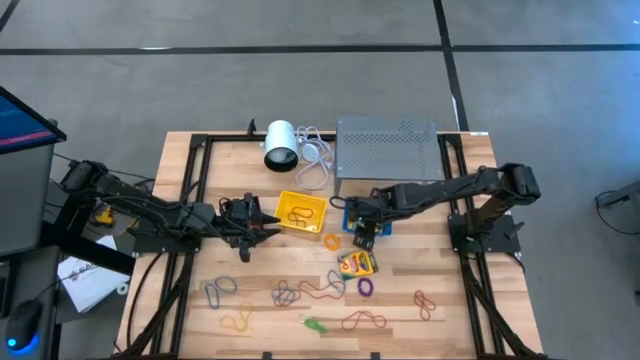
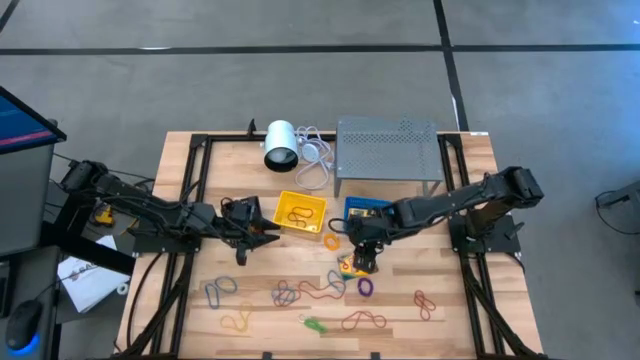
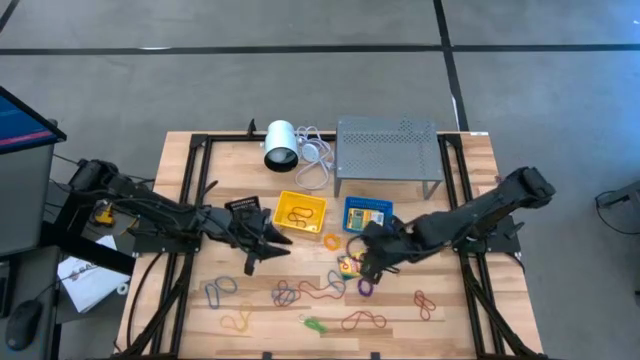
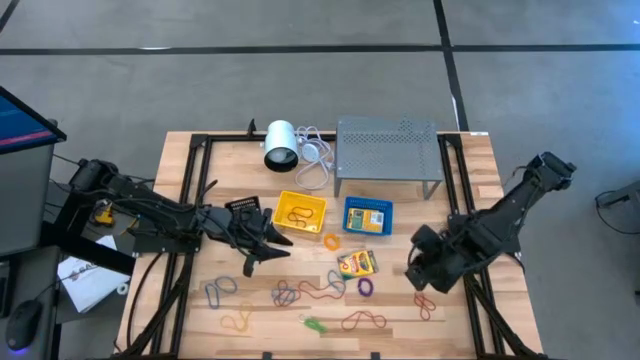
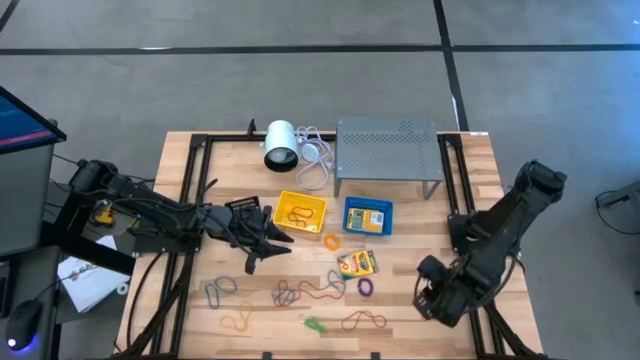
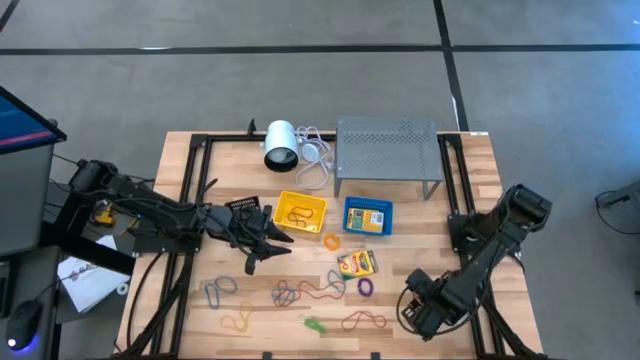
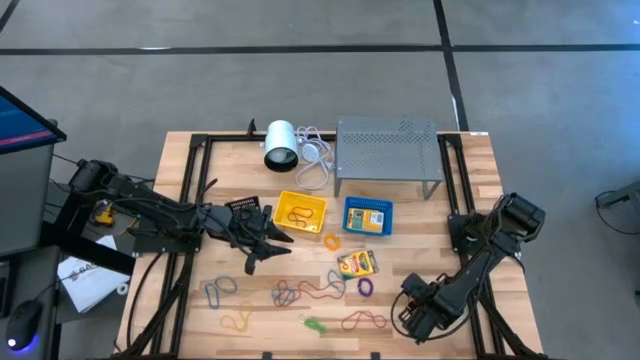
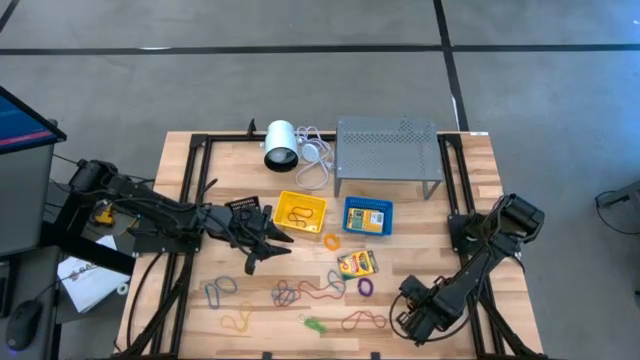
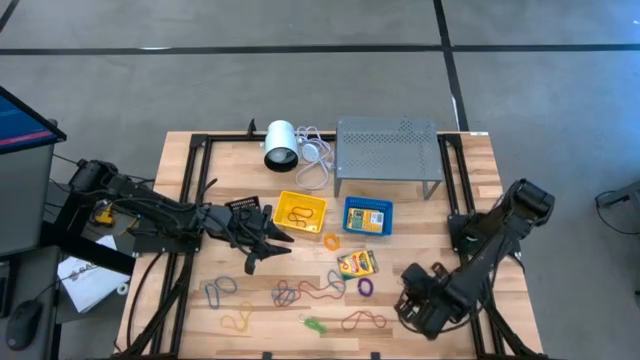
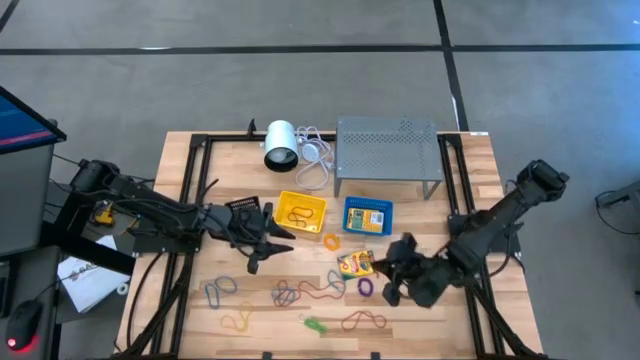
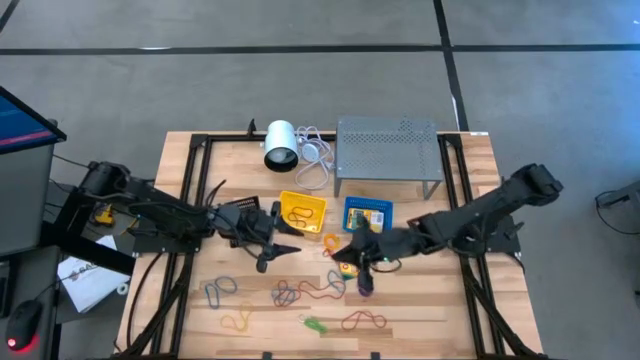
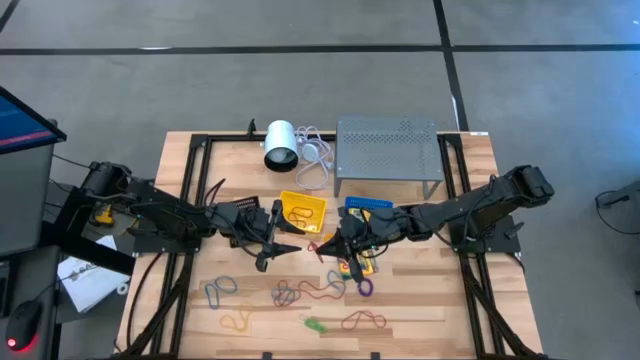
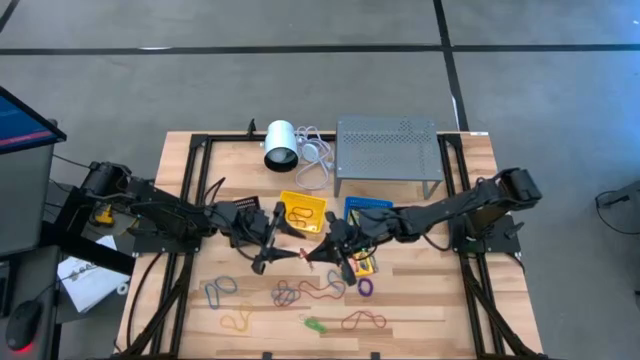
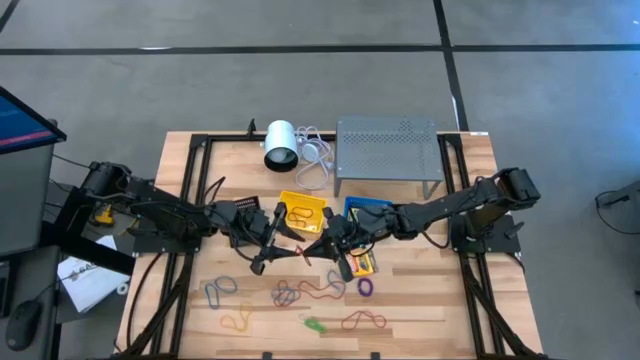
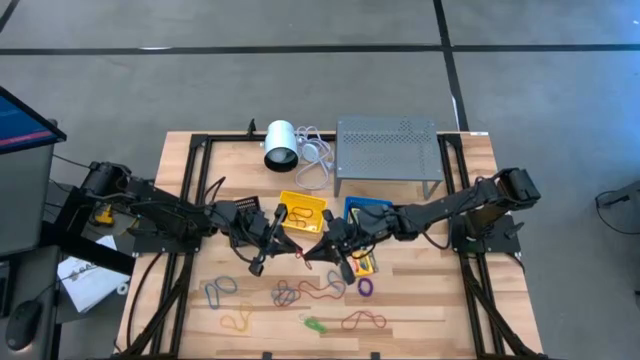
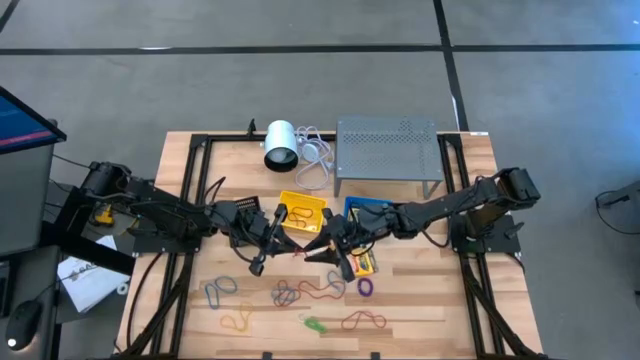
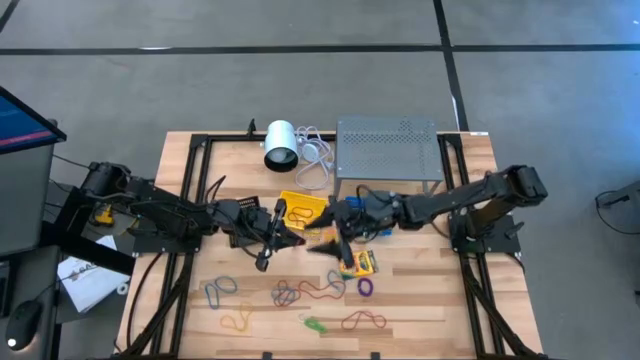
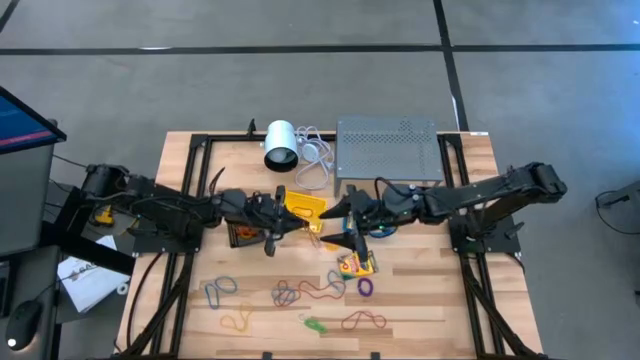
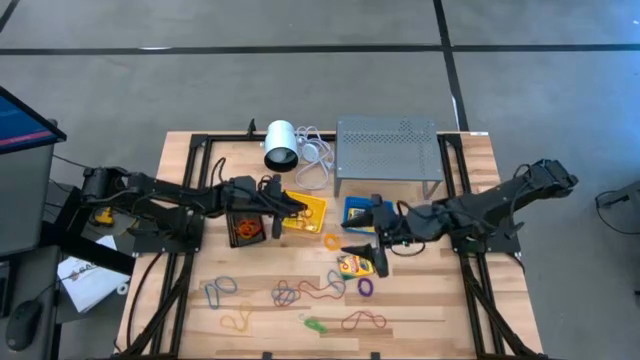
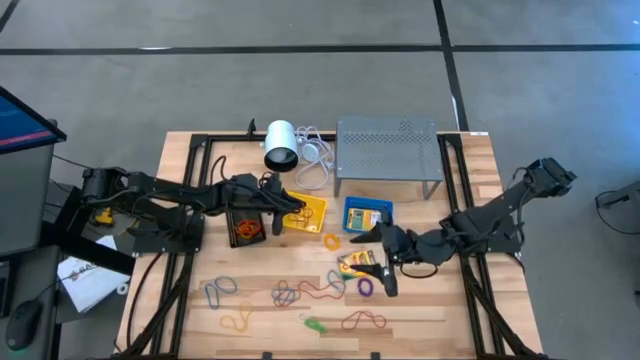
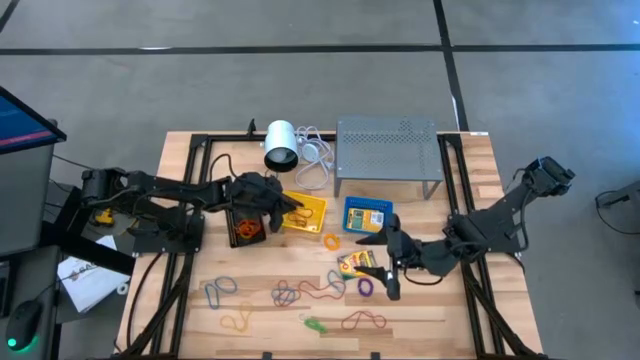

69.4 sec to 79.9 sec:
Task: Pick & Place Office Desk Supplies
Put the red rubber band into the yellow bin

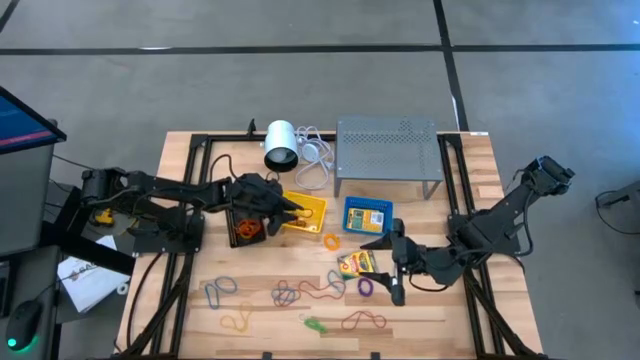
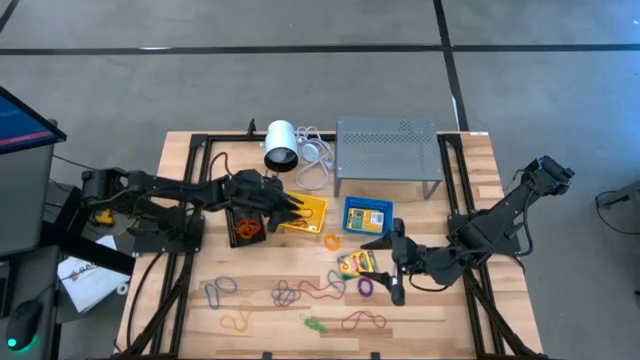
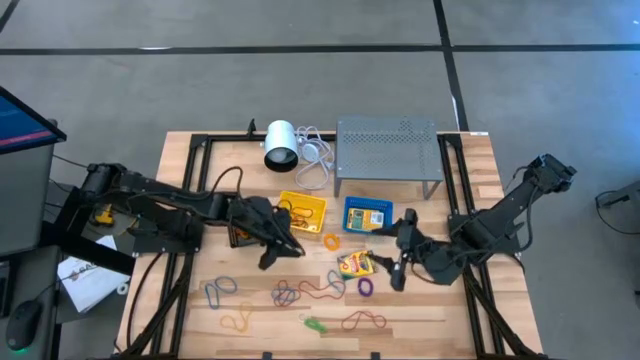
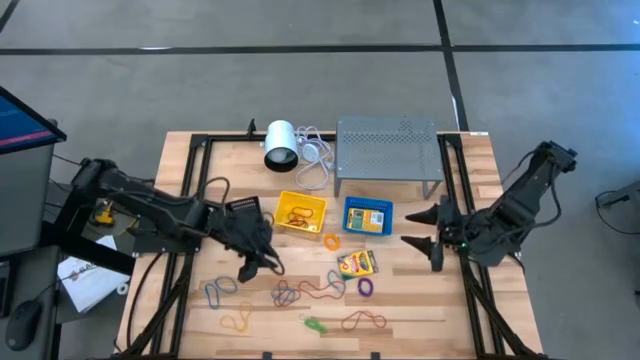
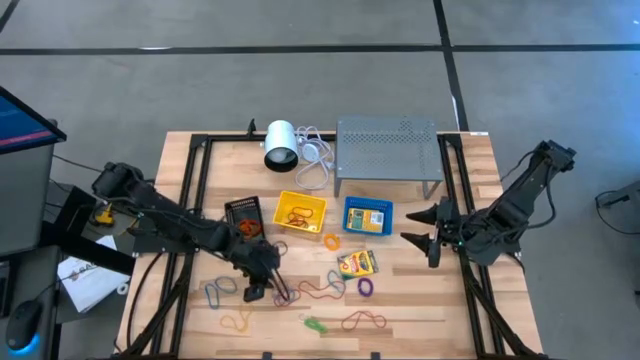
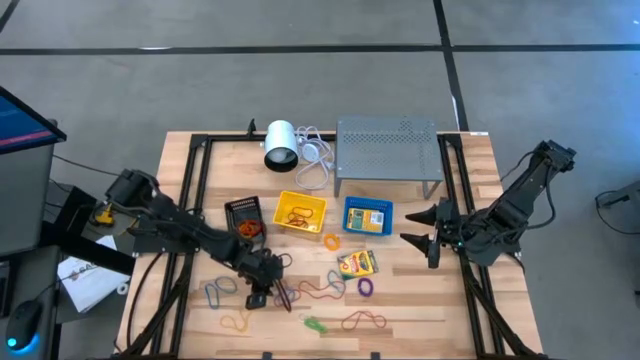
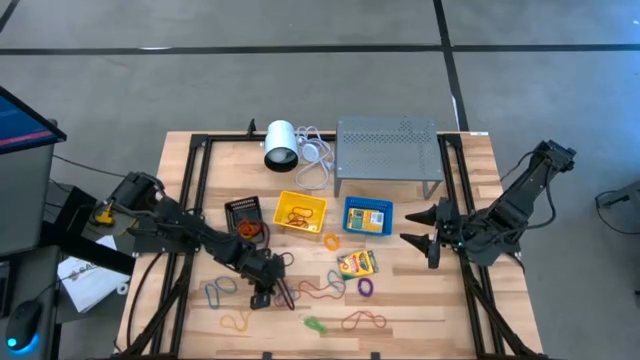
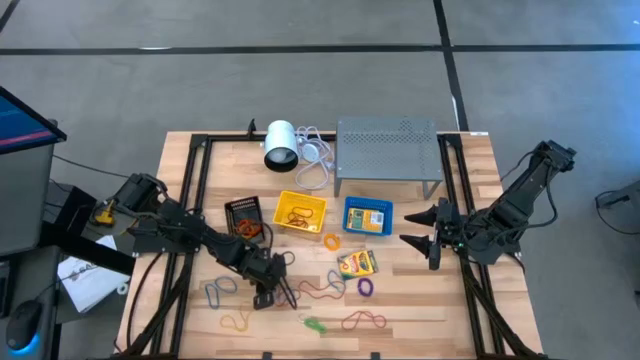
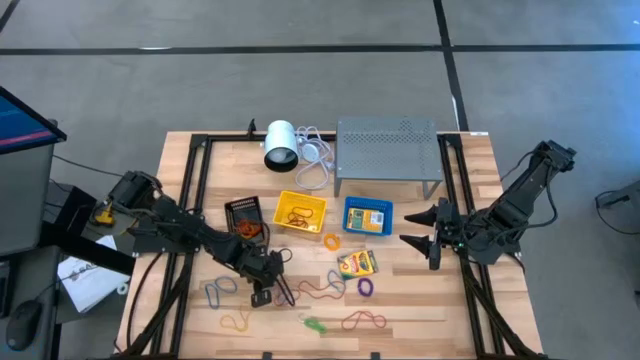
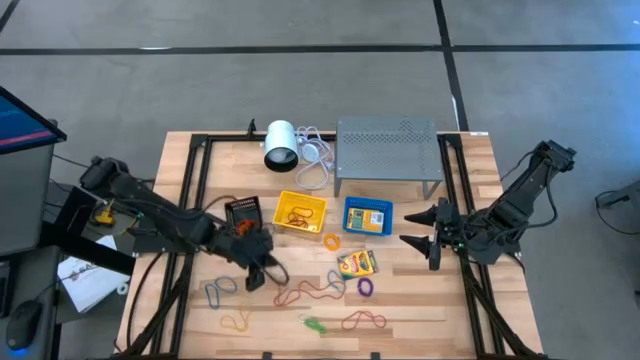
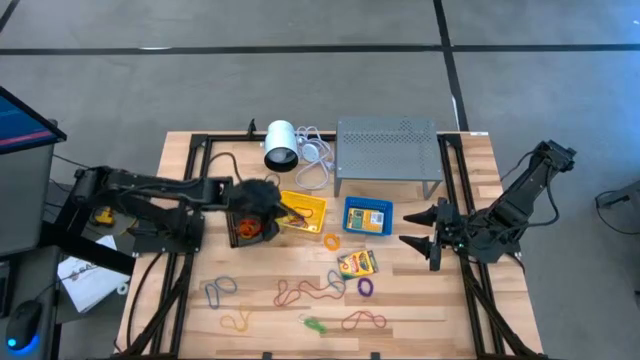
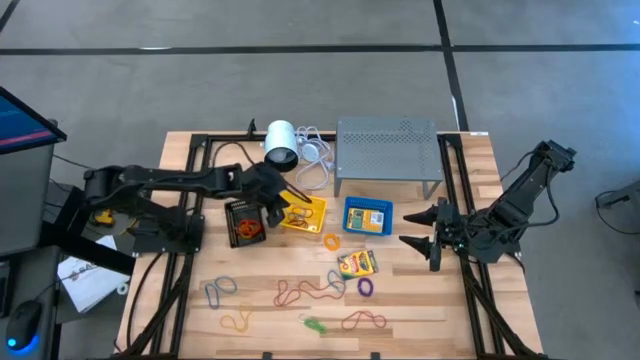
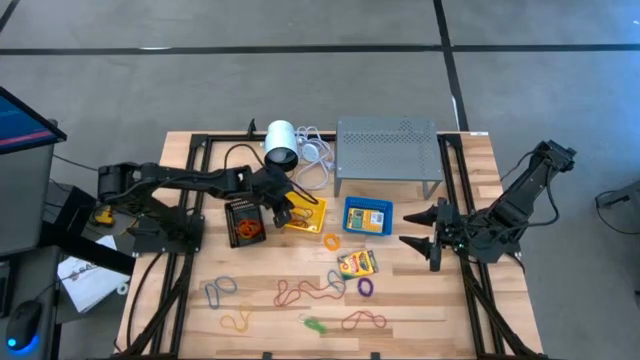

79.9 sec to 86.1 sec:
Put the blue rubber band into the yellow bin

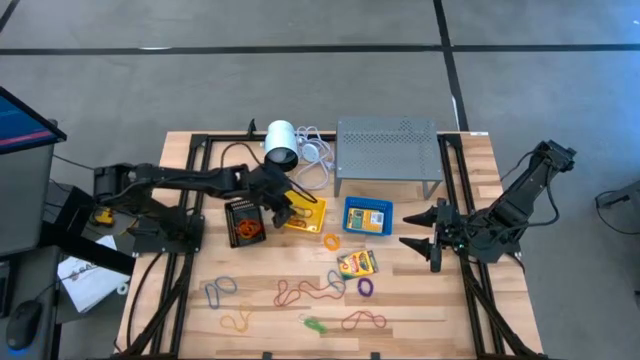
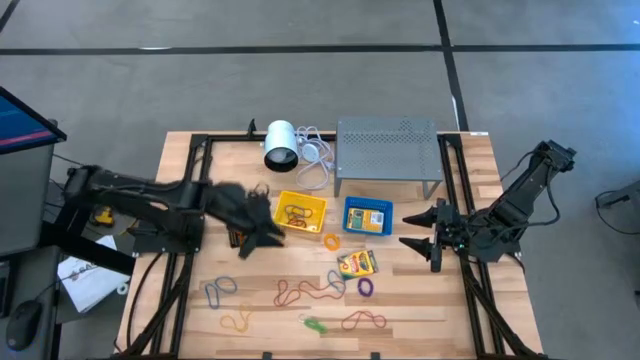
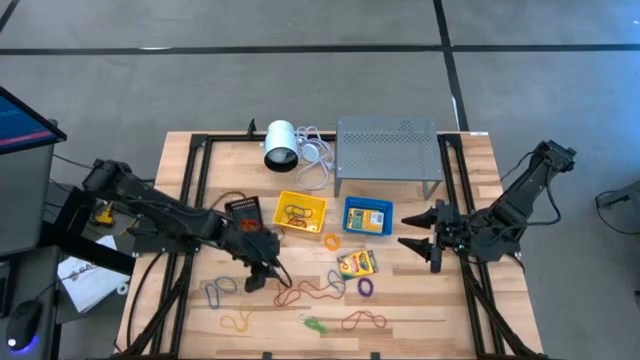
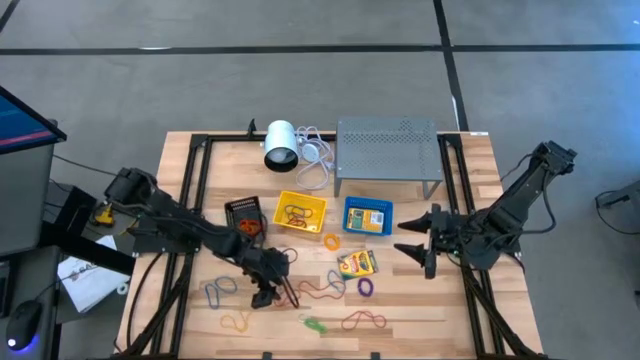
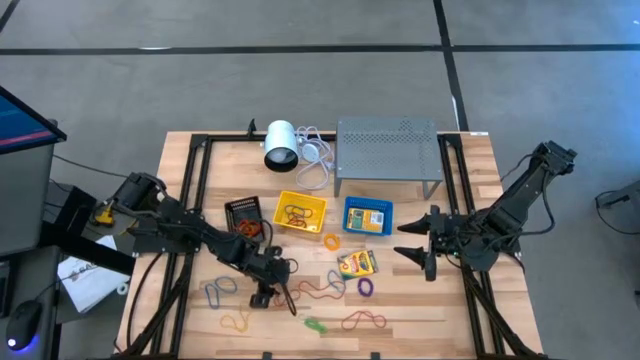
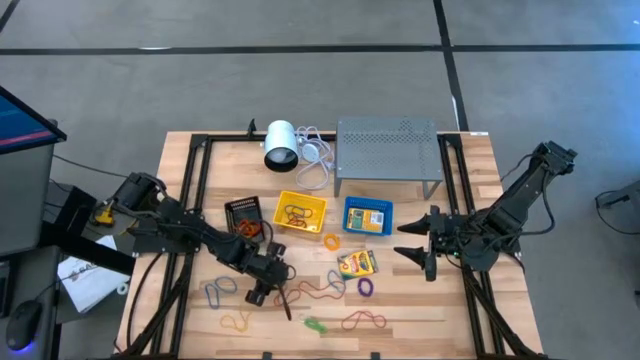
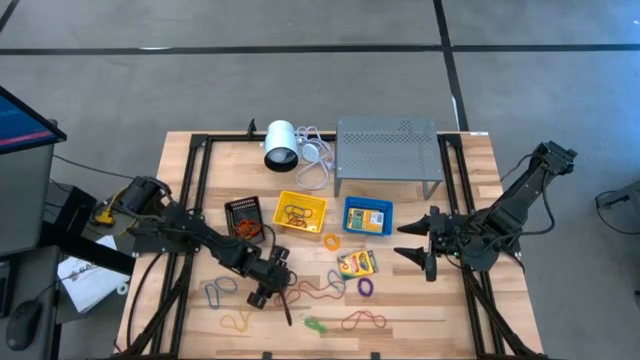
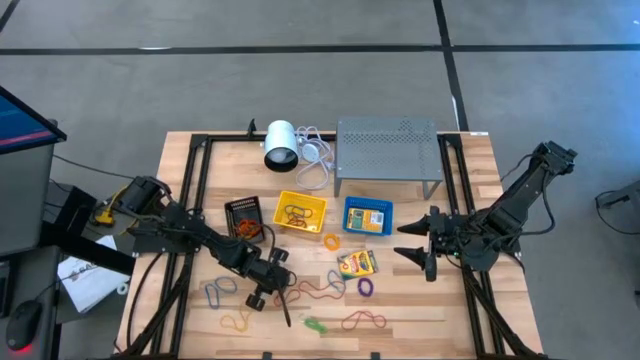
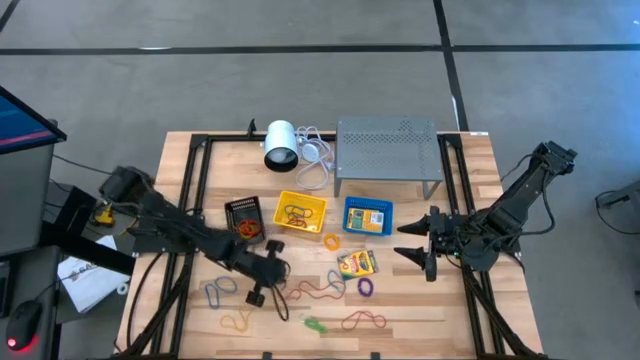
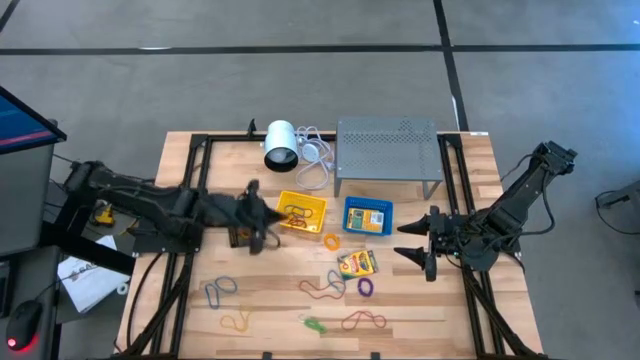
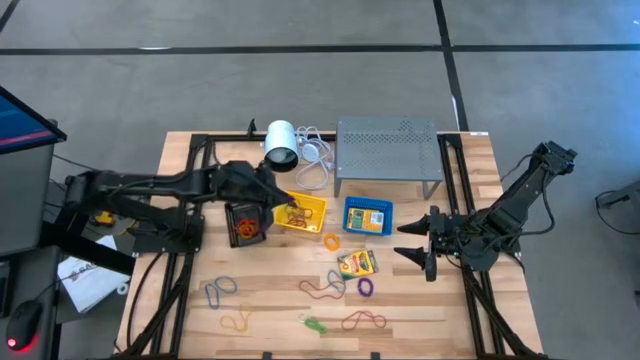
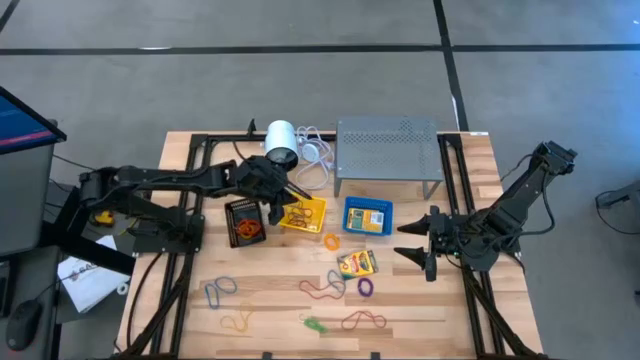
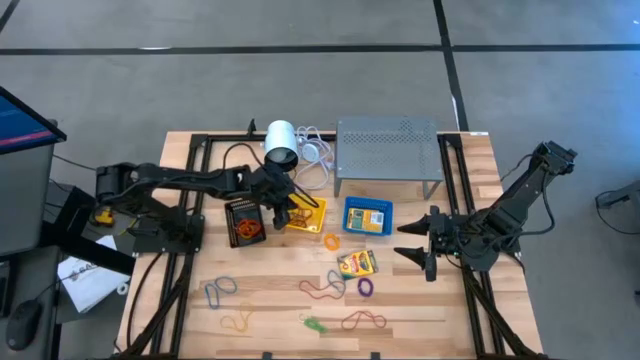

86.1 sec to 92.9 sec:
Put the red rubber band into the yellow bin
